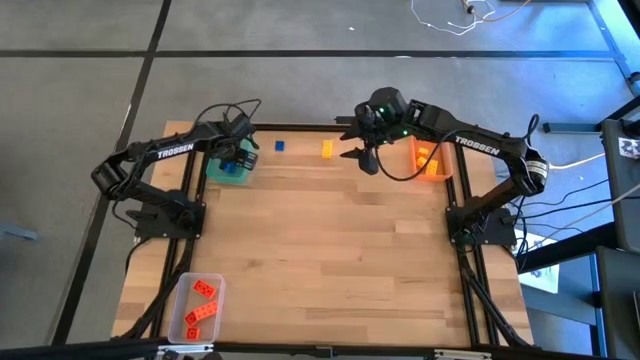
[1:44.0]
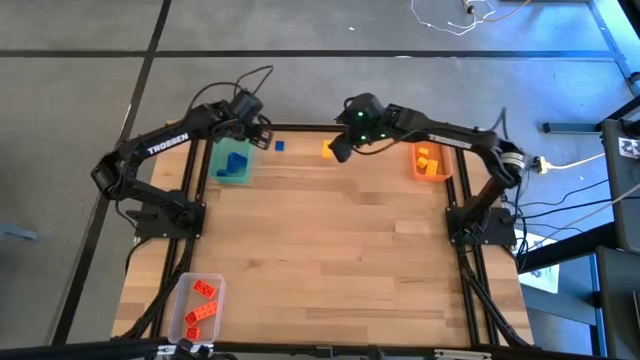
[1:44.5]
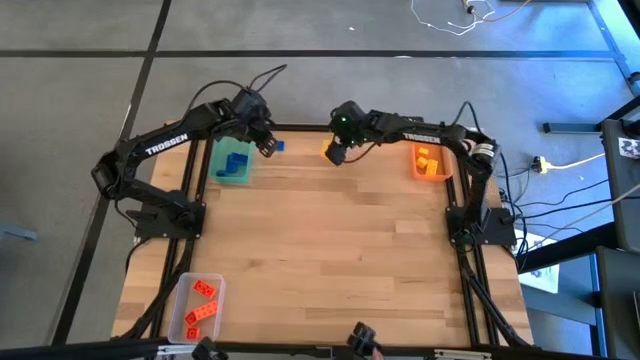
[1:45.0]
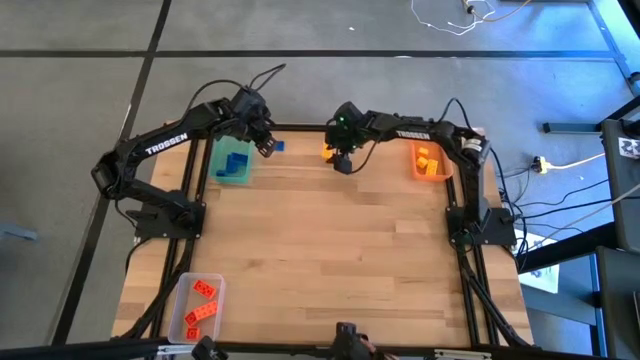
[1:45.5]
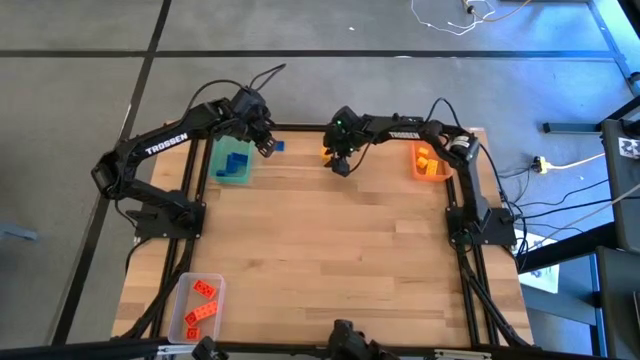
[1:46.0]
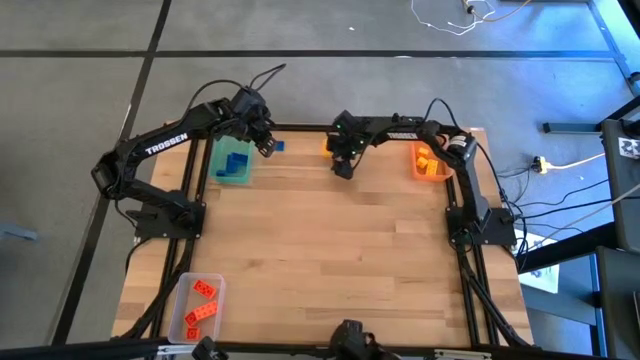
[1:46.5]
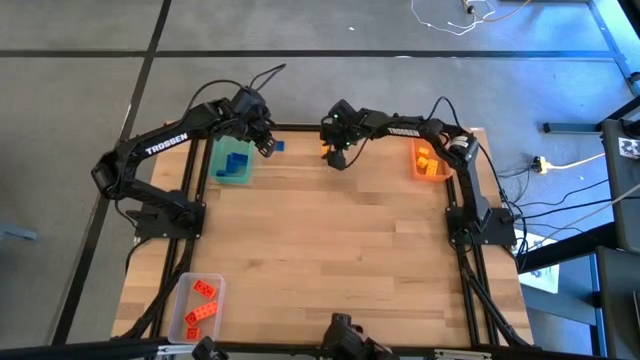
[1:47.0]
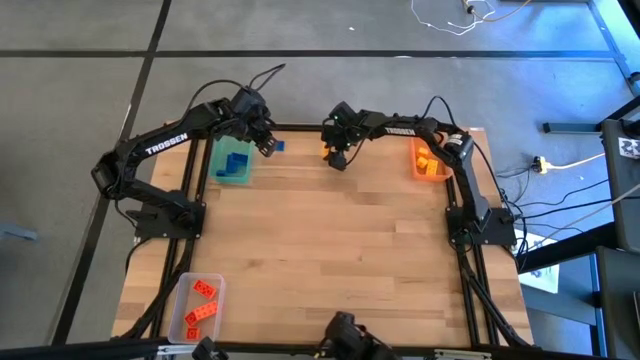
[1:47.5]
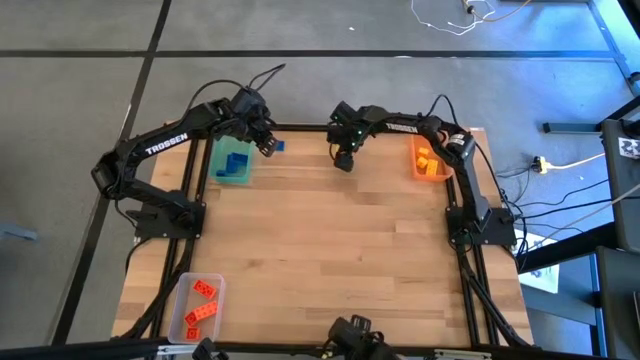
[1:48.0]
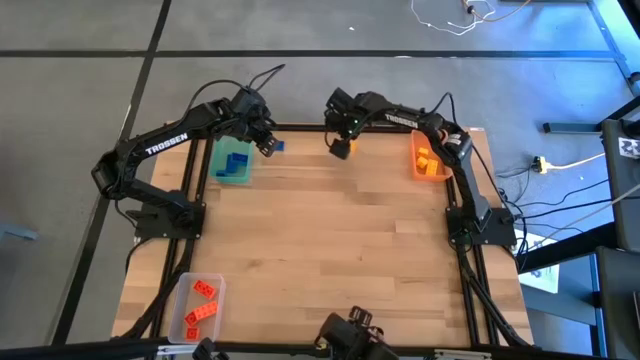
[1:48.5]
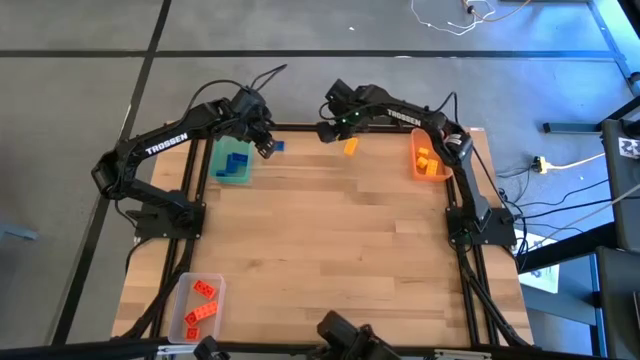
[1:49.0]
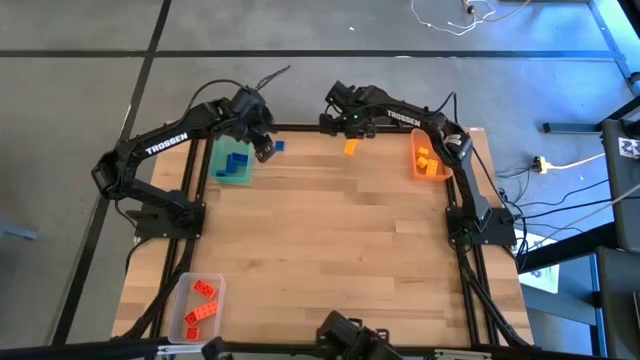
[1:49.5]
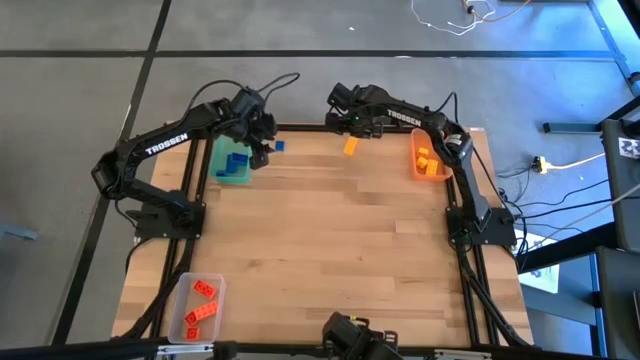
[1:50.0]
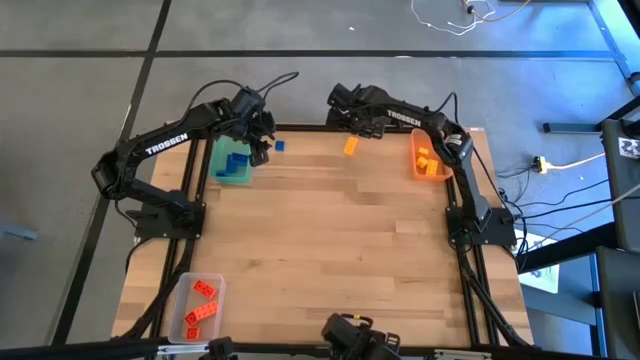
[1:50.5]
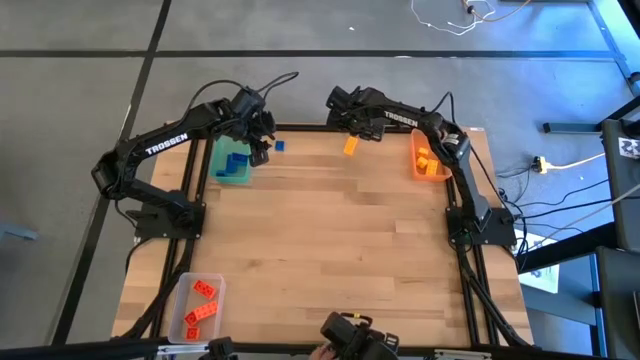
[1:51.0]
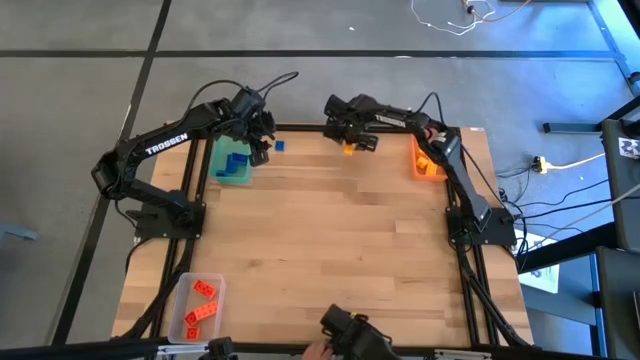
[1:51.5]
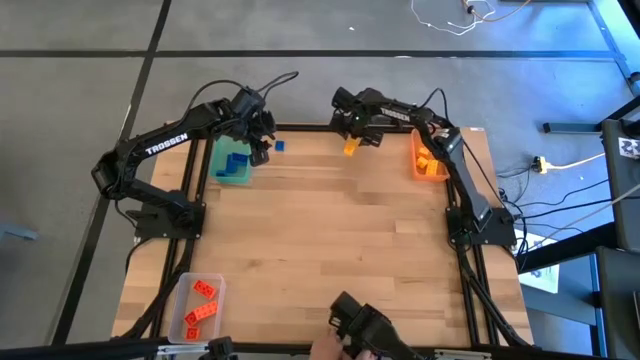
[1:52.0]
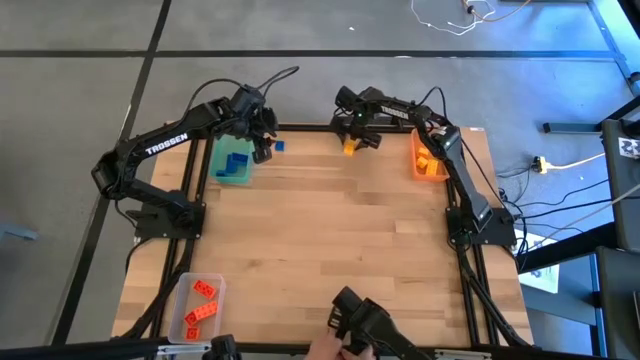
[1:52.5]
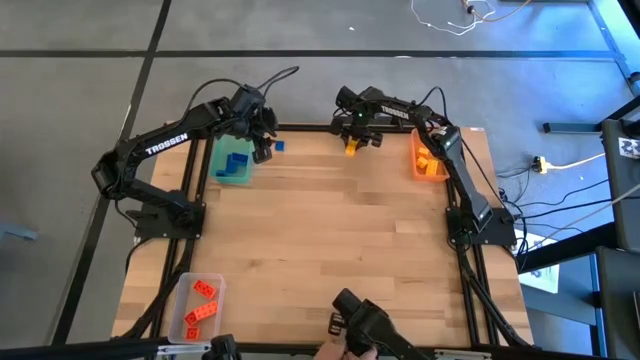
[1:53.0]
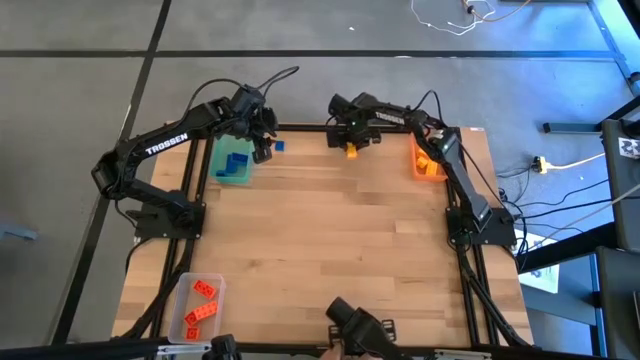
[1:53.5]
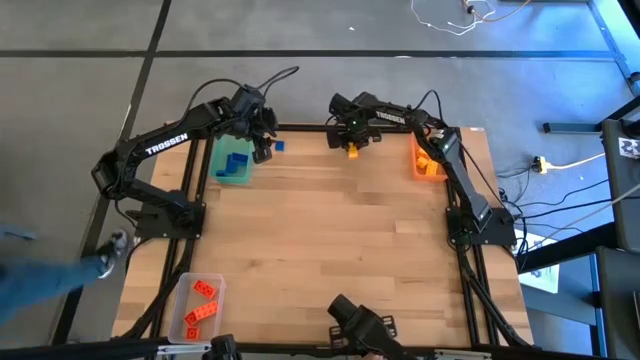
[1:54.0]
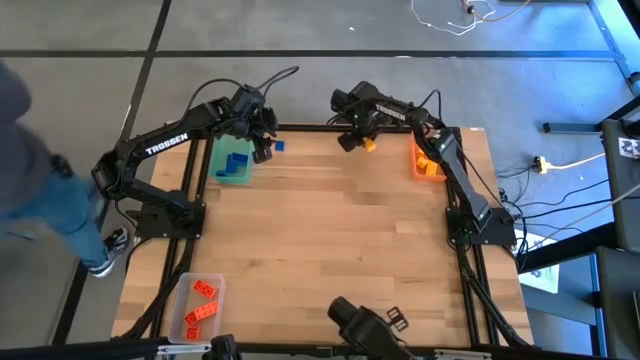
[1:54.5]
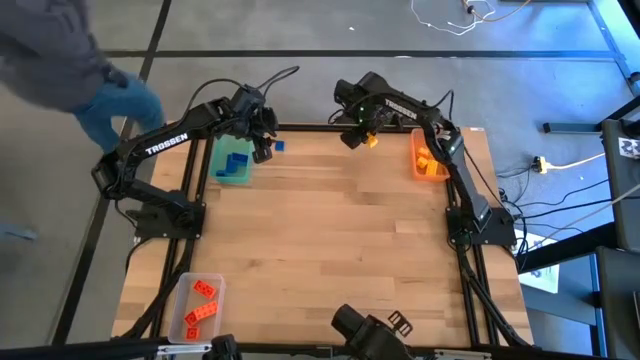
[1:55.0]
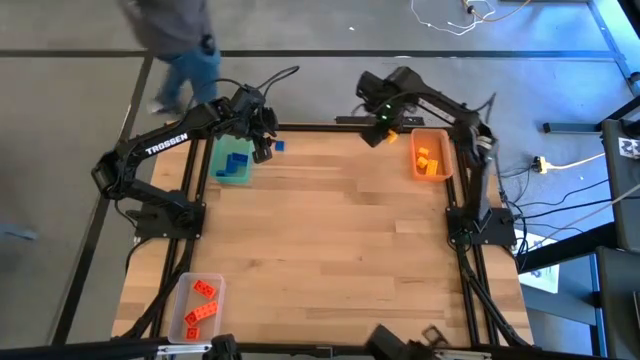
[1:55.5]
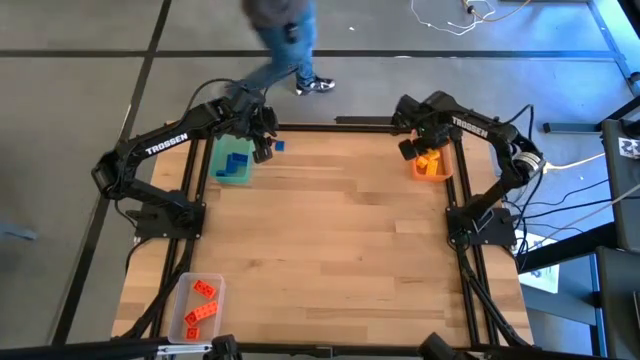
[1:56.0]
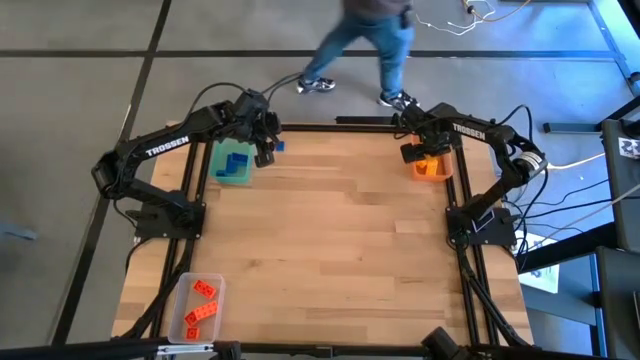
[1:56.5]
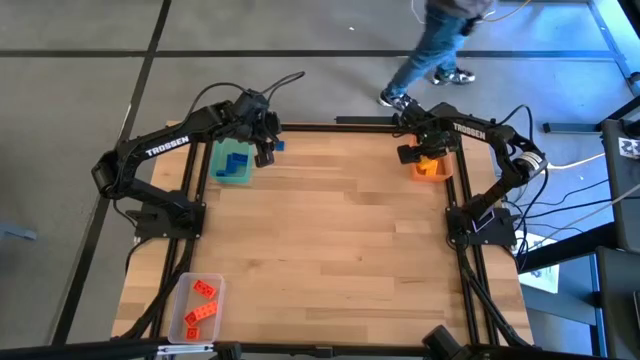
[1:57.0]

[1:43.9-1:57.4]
Task: Sort & place blocks by color
Put the yellow game piece into the orange bin

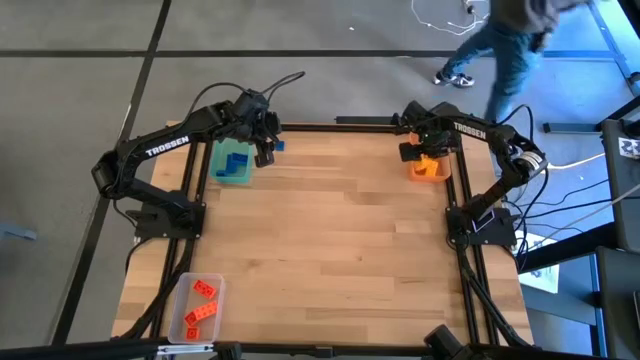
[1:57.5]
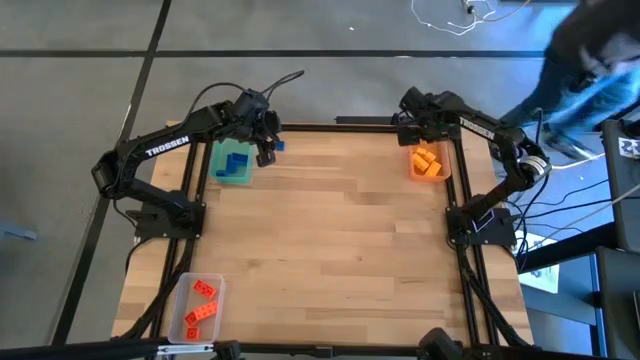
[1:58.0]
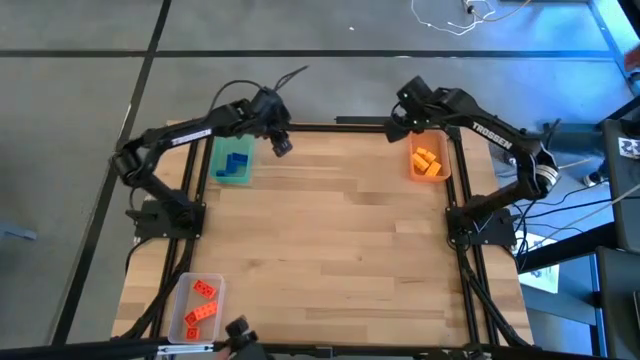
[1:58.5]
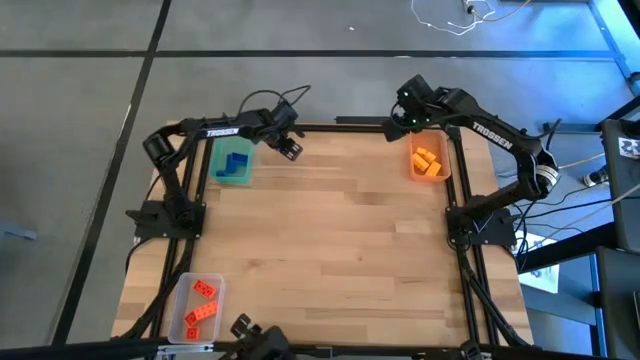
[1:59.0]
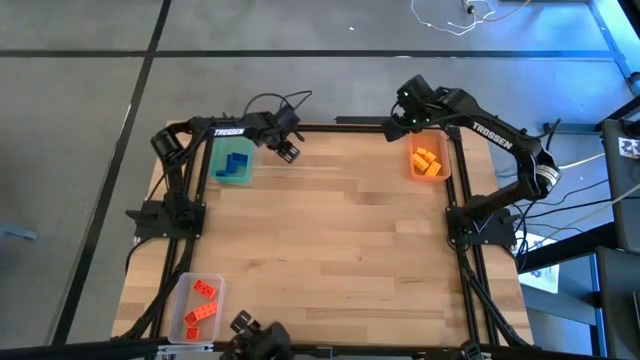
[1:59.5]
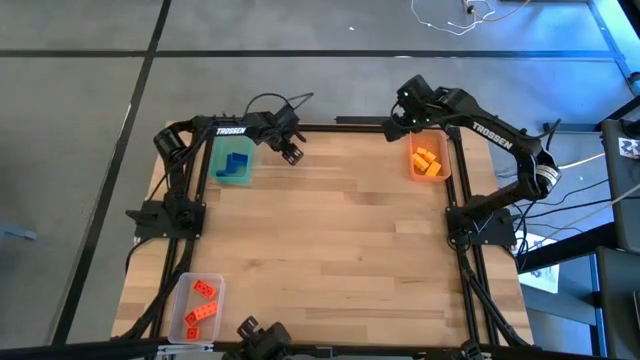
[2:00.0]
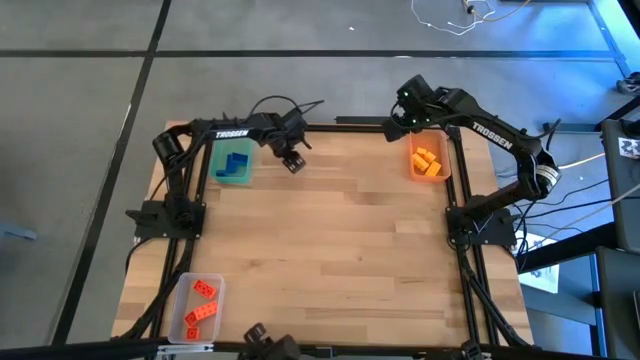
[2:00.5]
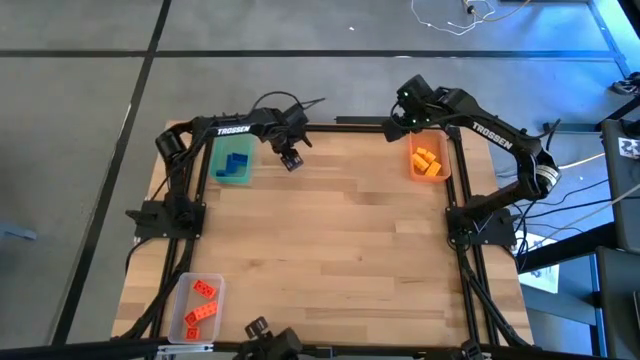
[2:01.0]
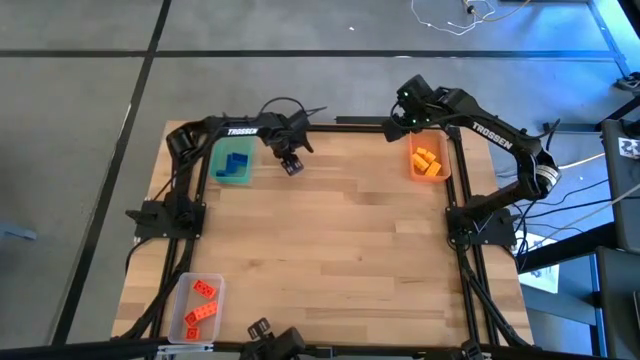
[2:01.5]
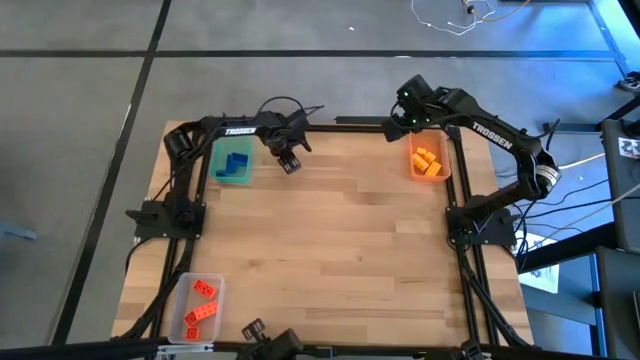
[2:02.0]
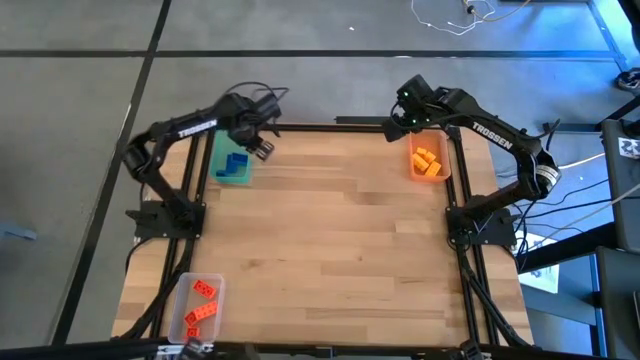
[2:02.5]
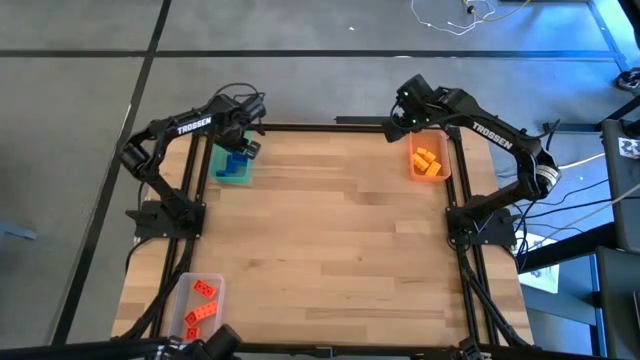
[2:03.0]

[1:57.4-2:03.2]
Put the blue game piece into the blue bin

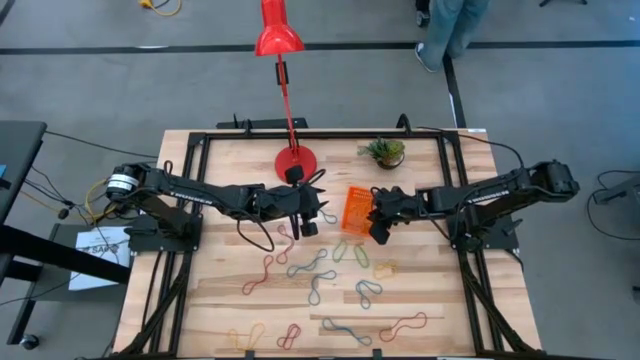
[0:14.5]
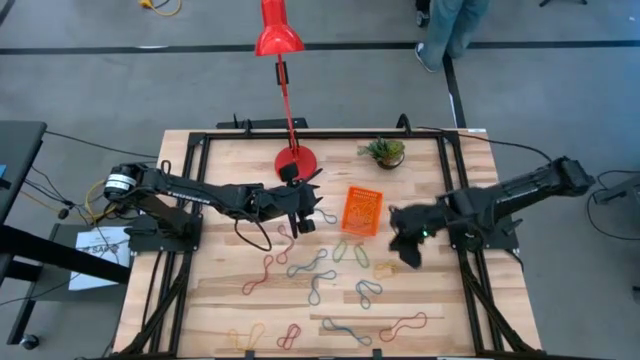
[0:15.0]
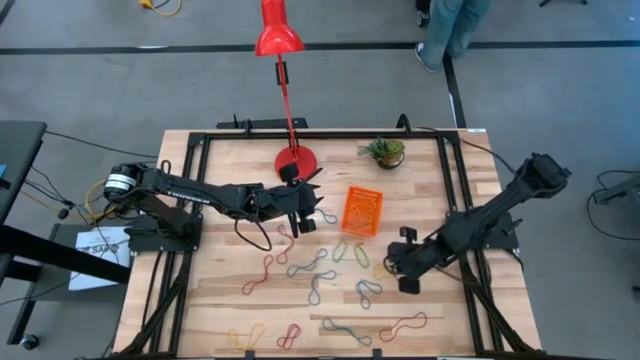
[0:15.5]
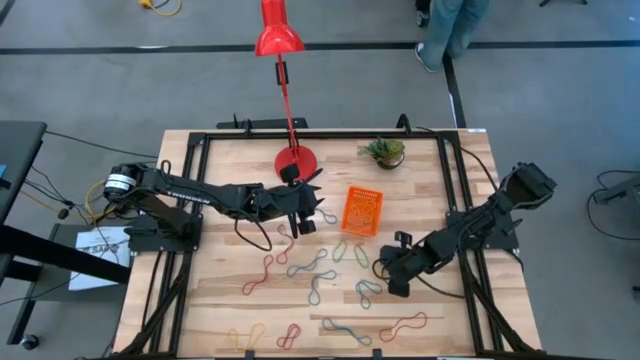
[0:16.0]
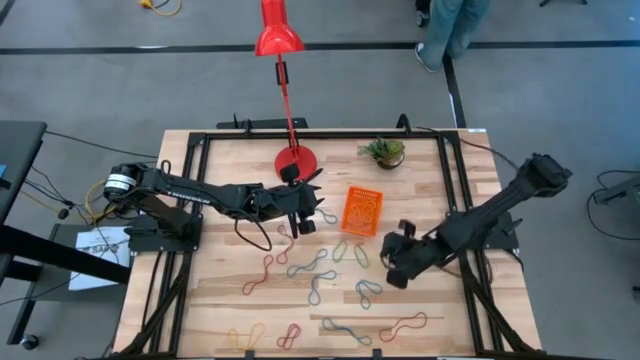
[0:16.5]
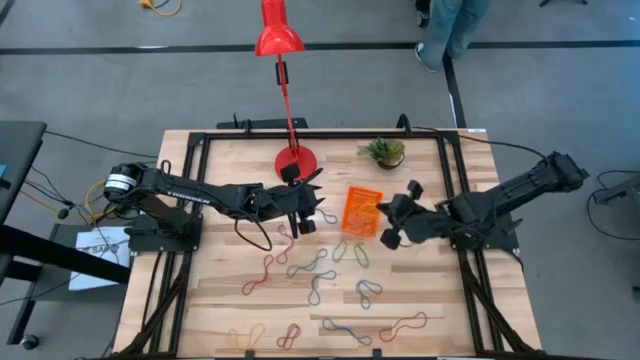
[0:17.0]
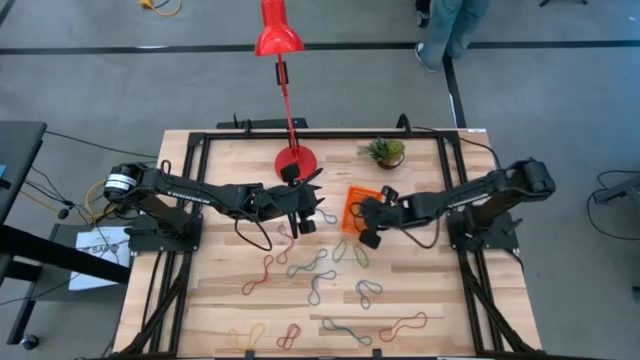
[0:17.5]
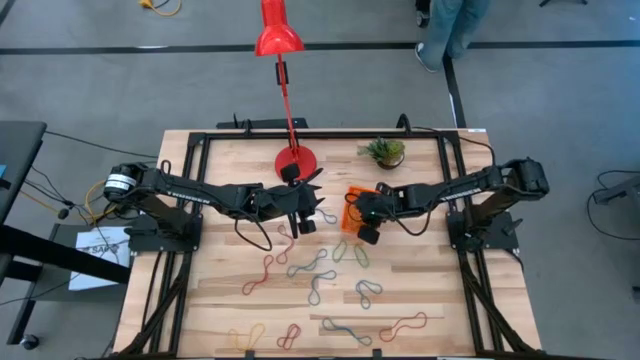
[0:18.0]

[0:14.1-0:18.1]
Task: Pick and place items into bin
Put the top yellow rubberband into the orange basket
